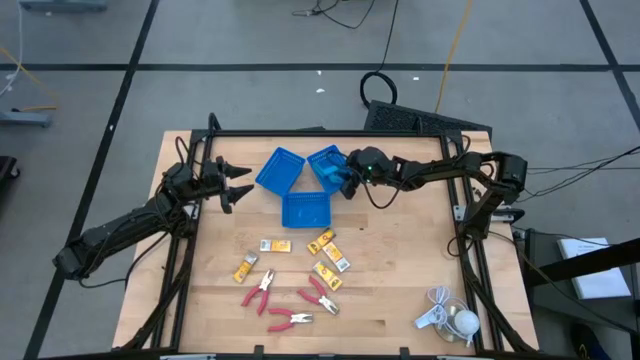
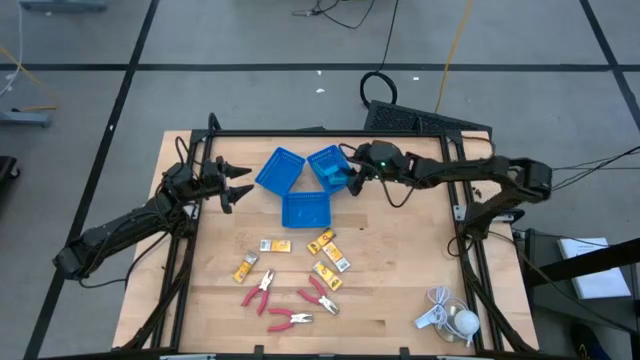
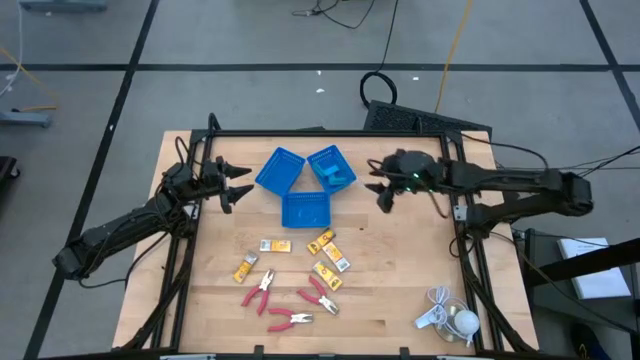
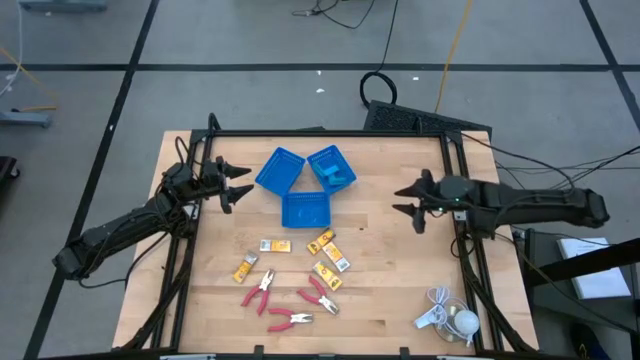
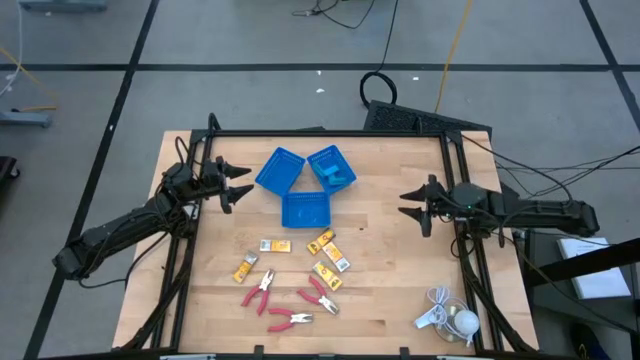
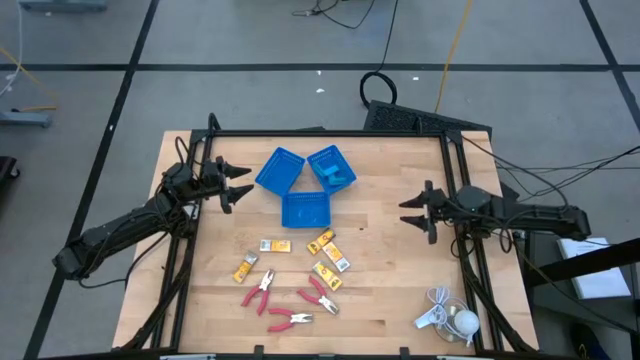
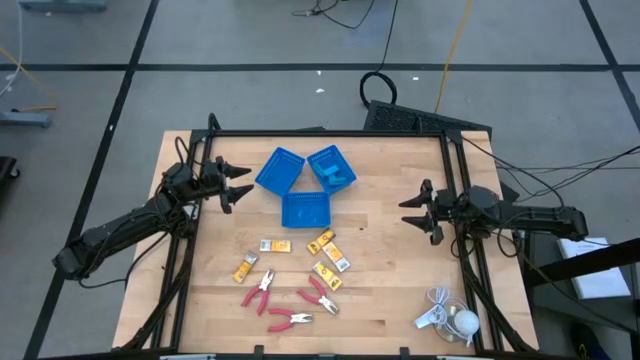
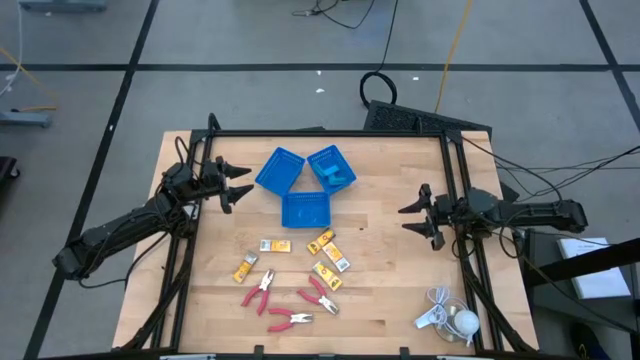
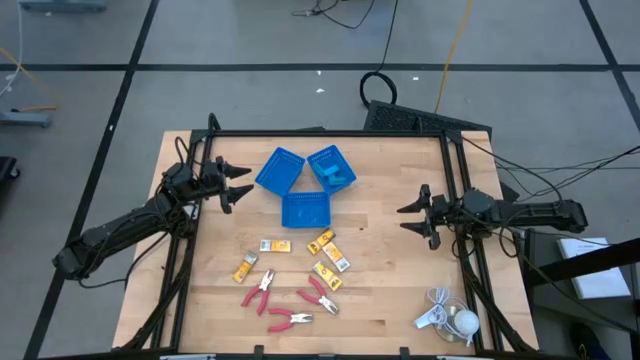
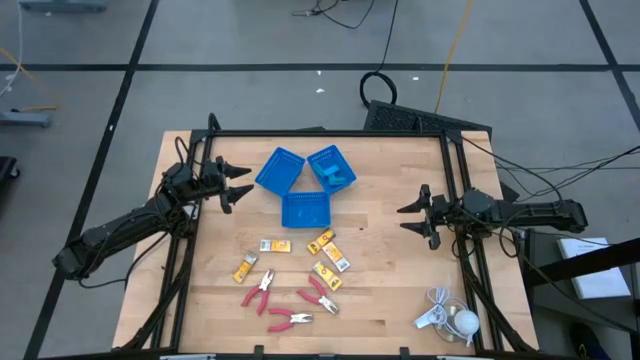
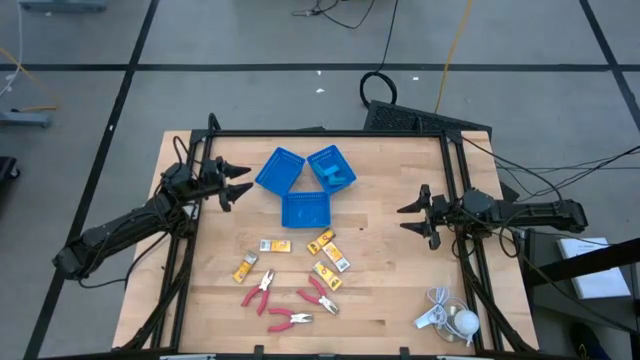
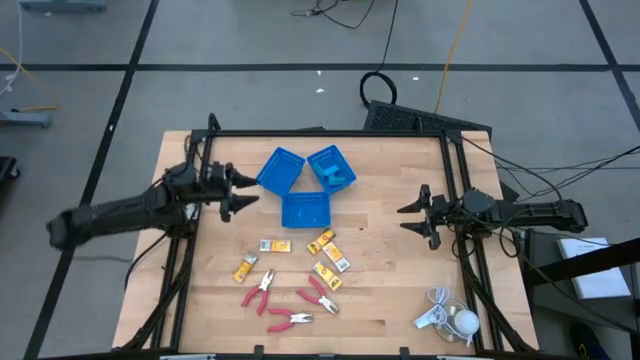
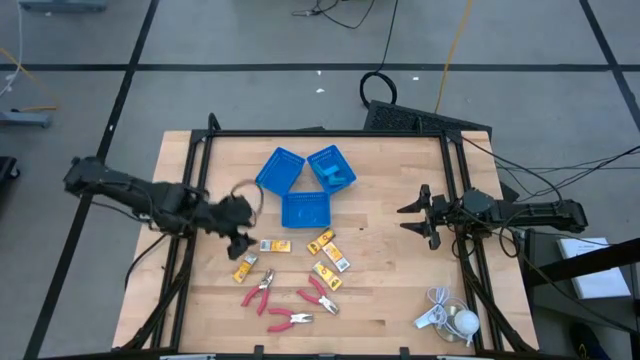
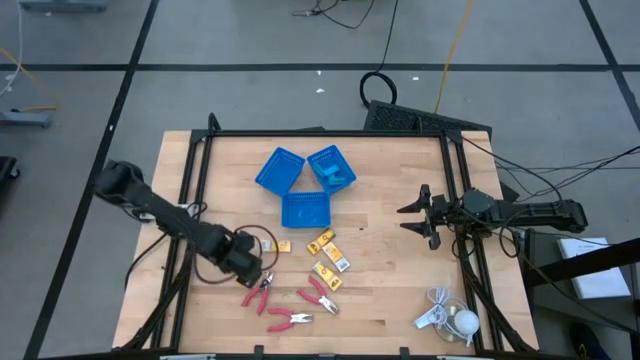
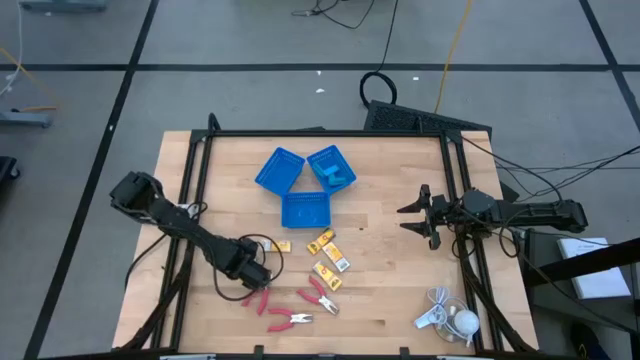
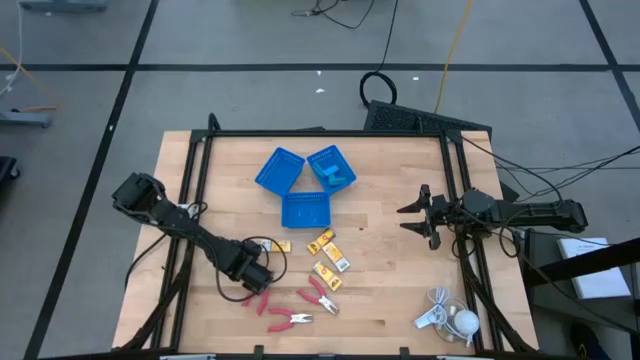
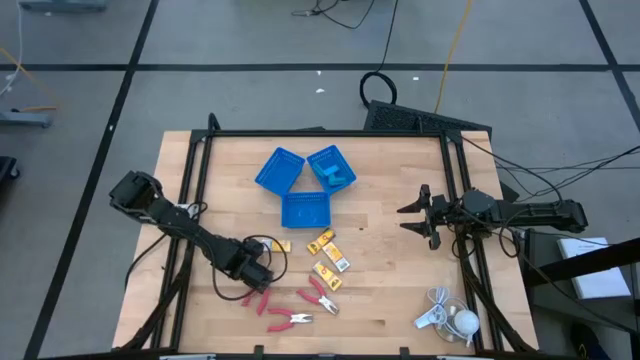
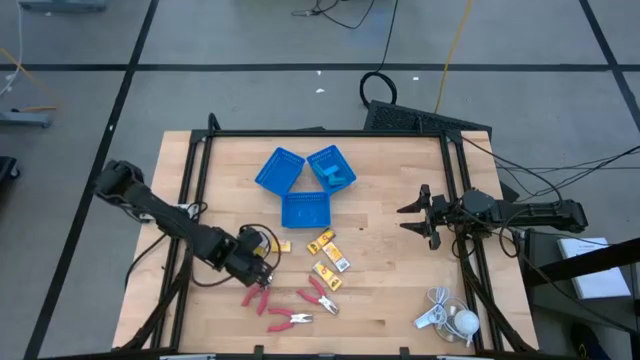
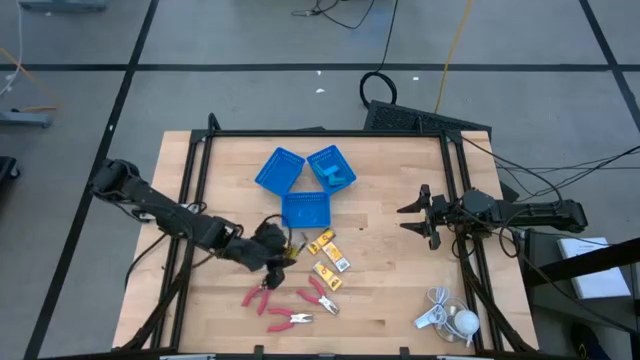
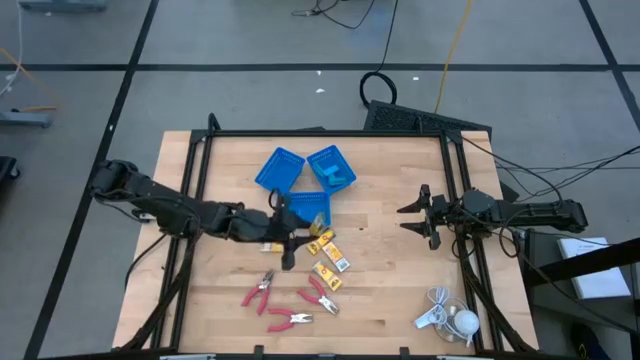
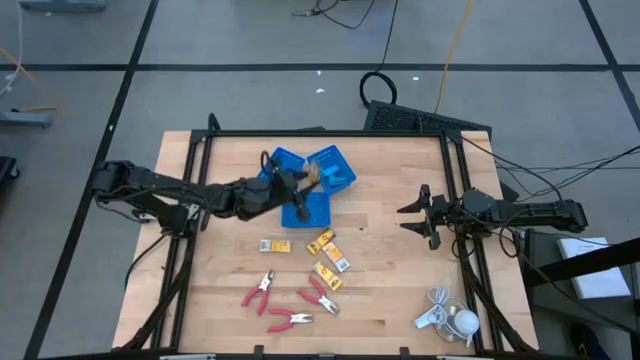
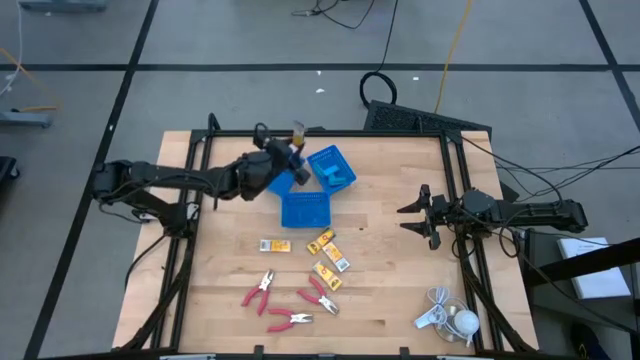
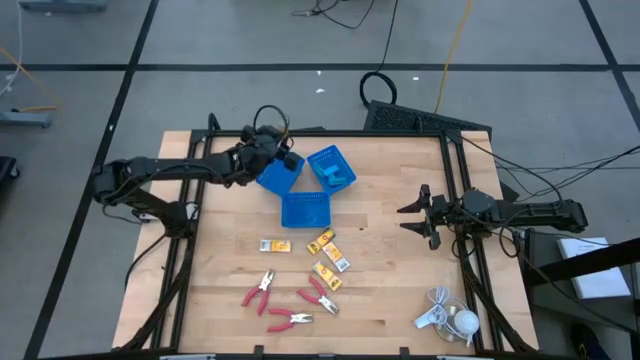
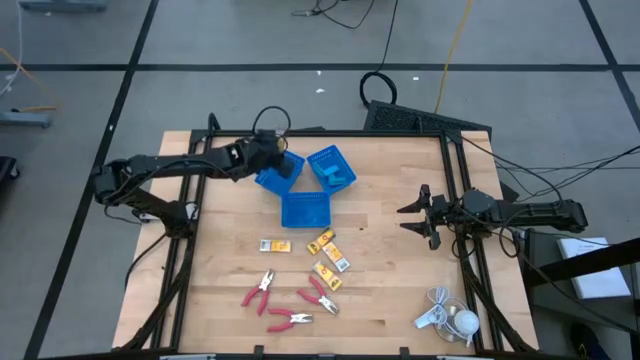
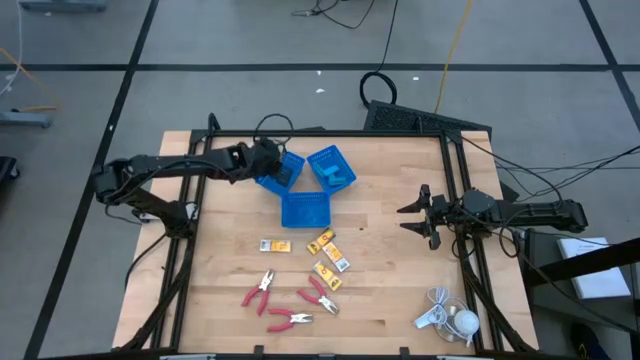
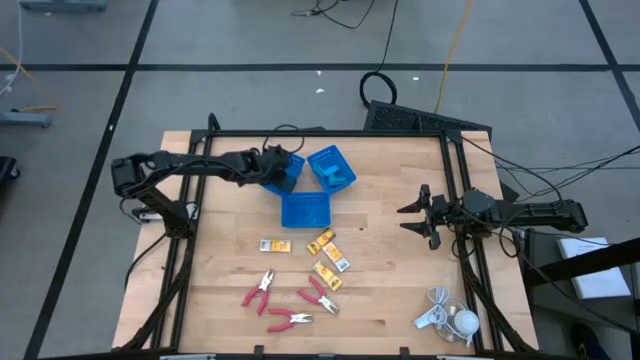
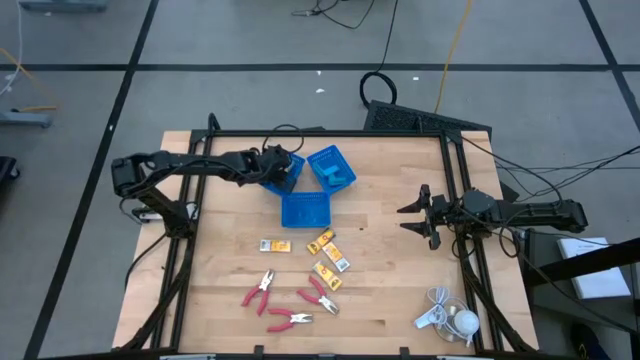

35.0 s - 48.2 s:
Task: Pick & Place School Supplies
Put the yellow crayon box into the top left blue bin

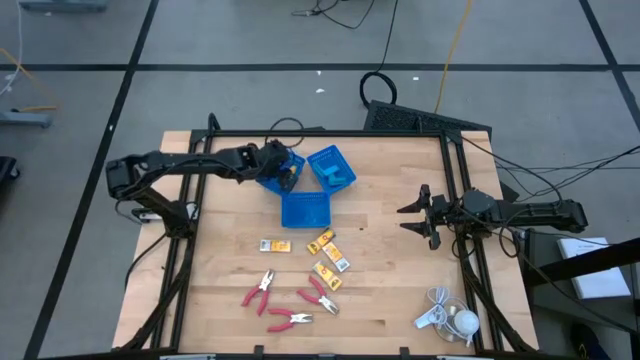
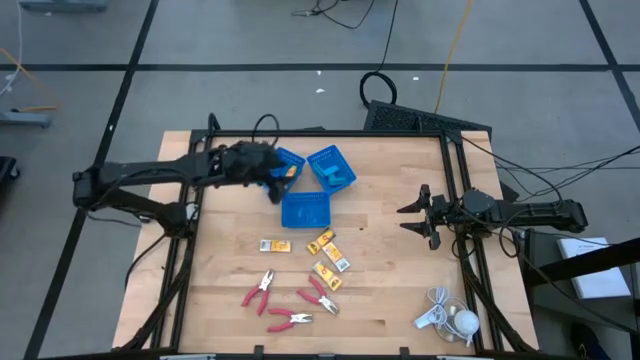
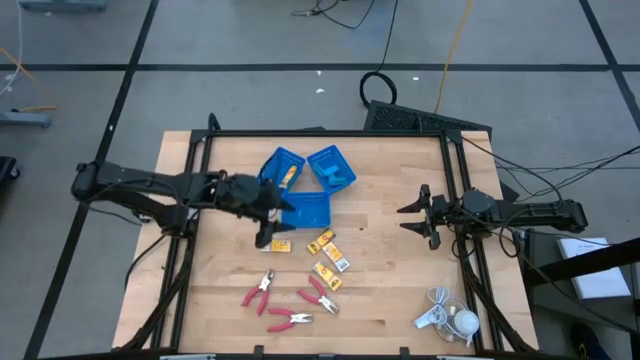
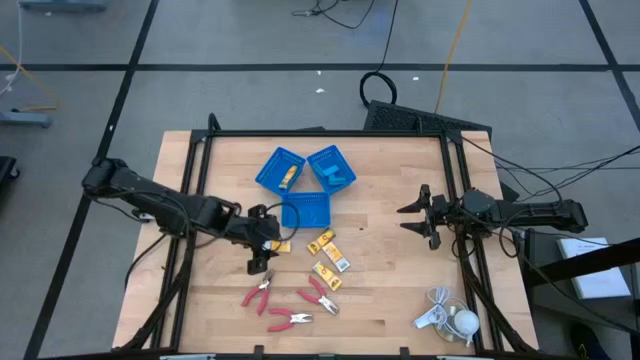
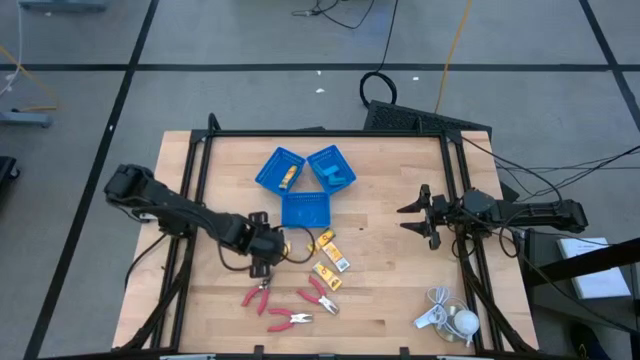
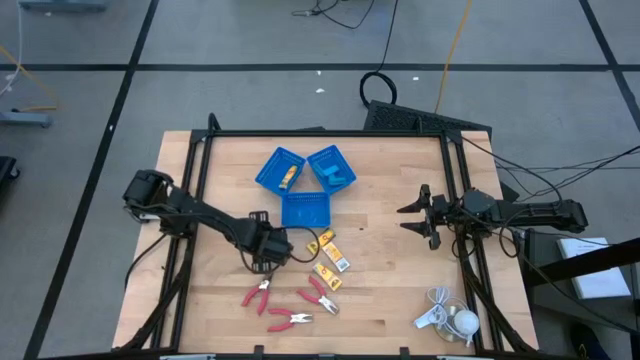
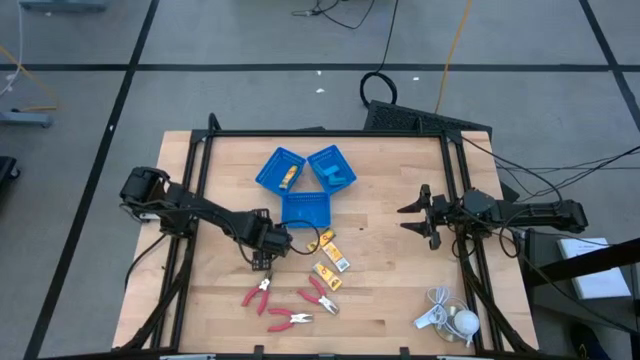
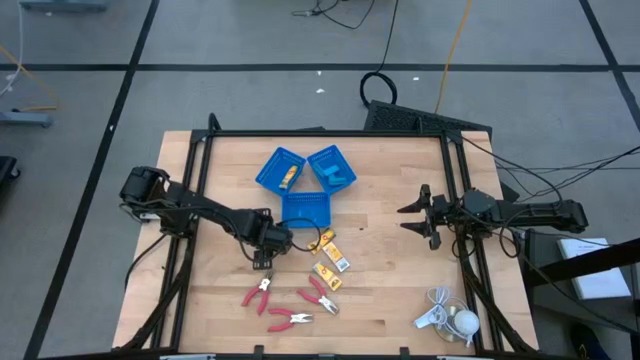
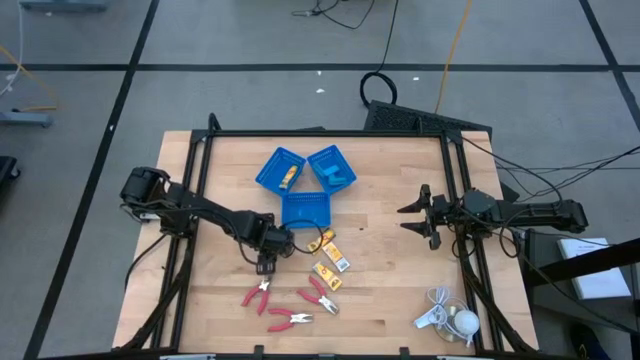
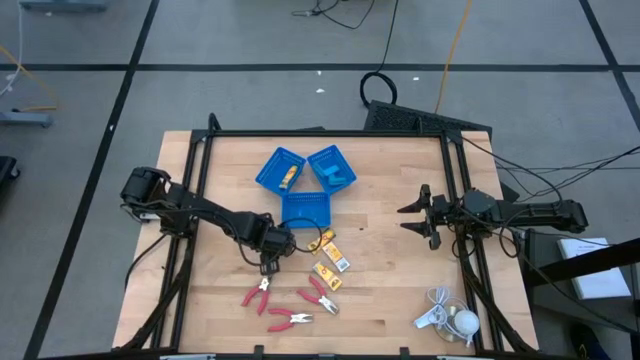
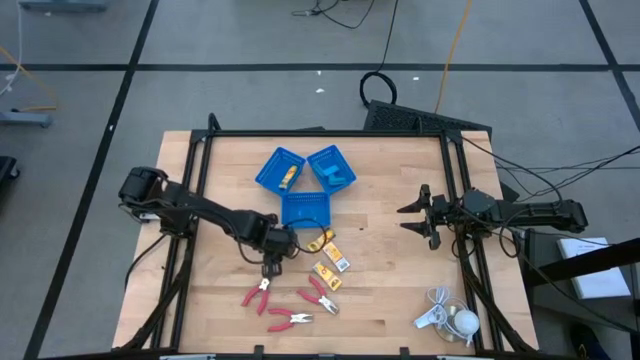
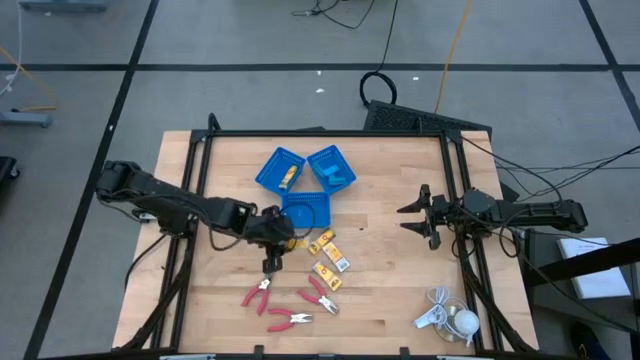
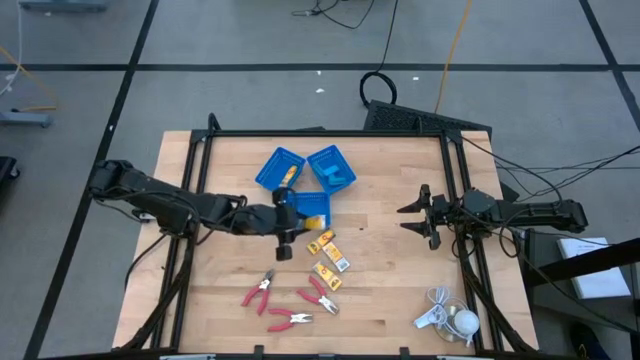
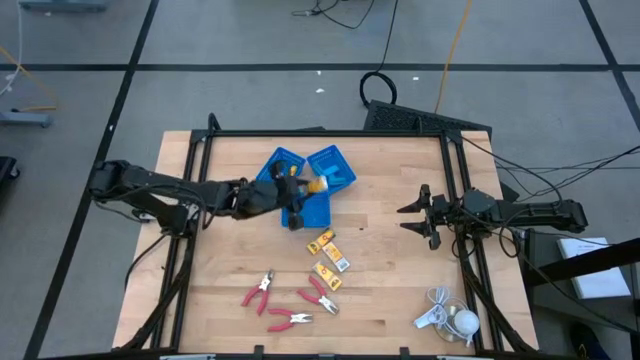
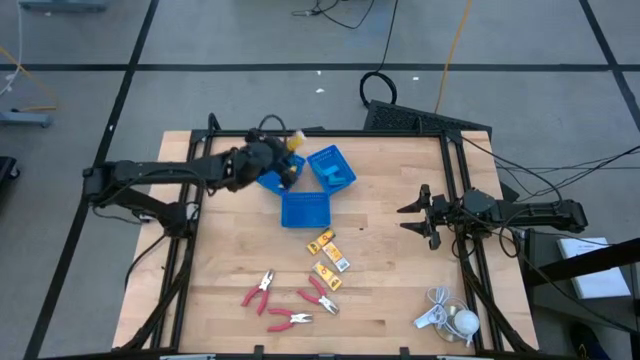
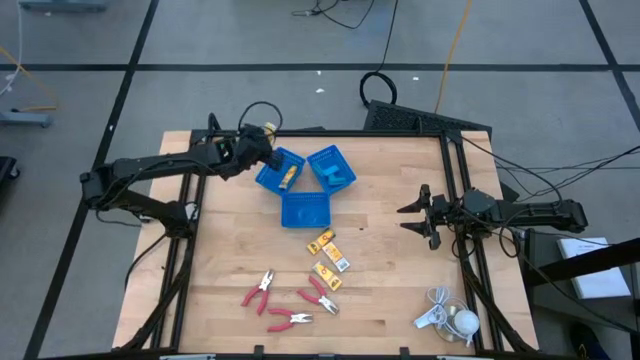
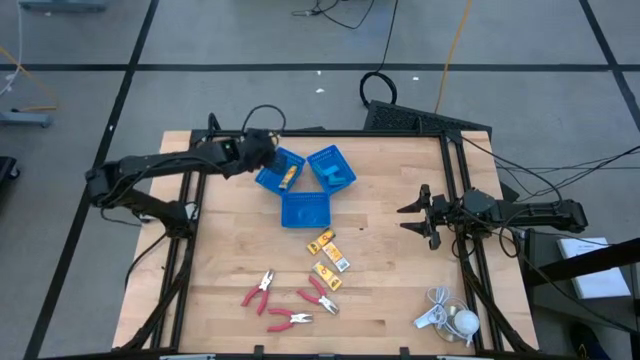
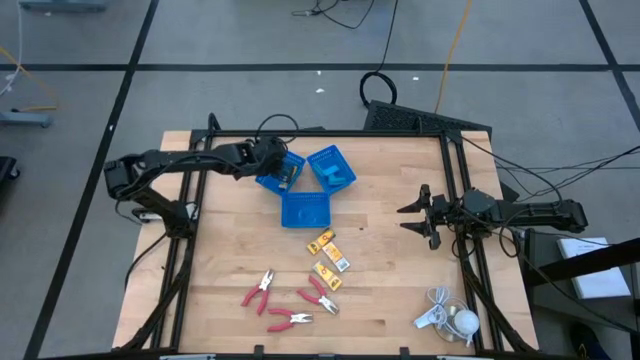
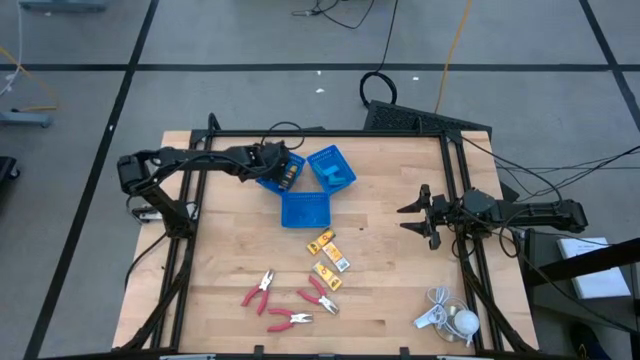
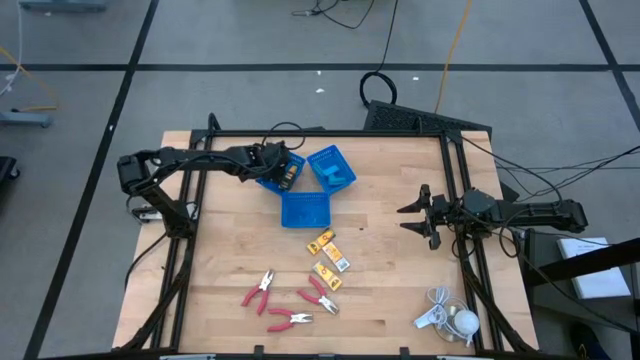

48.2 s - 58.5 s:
Put the yellow crayon box into the top left blue bin
